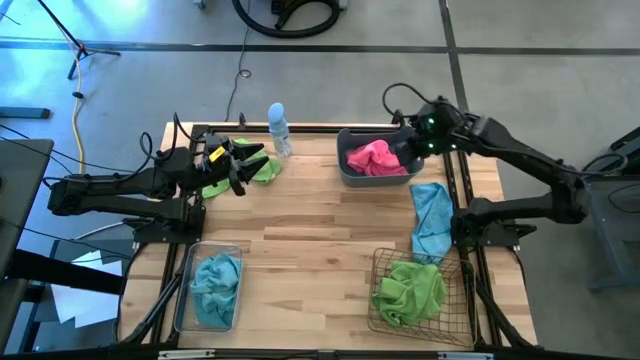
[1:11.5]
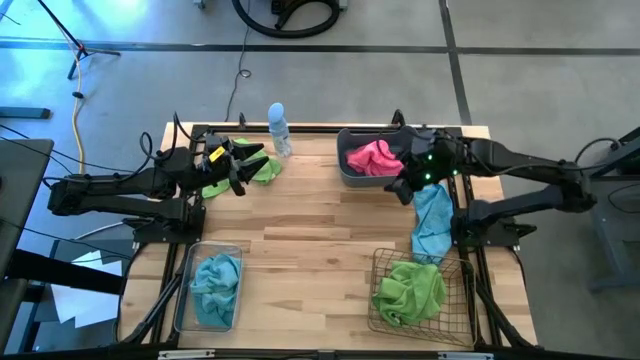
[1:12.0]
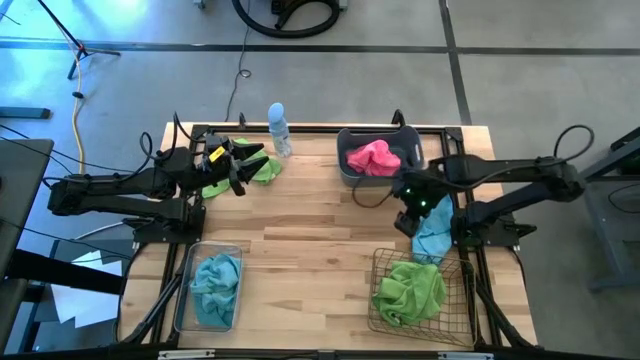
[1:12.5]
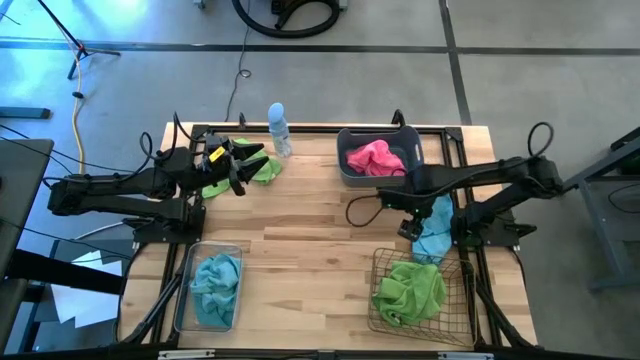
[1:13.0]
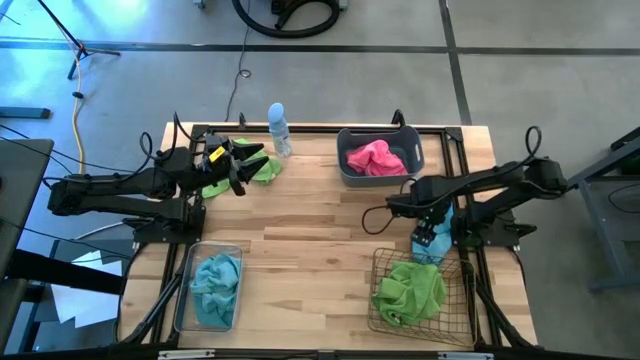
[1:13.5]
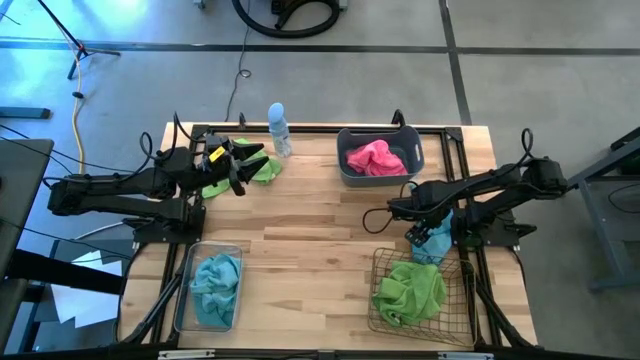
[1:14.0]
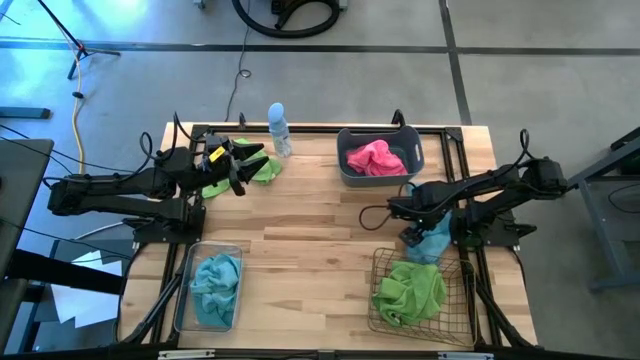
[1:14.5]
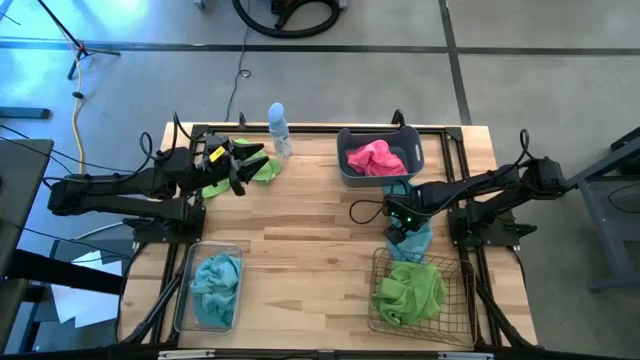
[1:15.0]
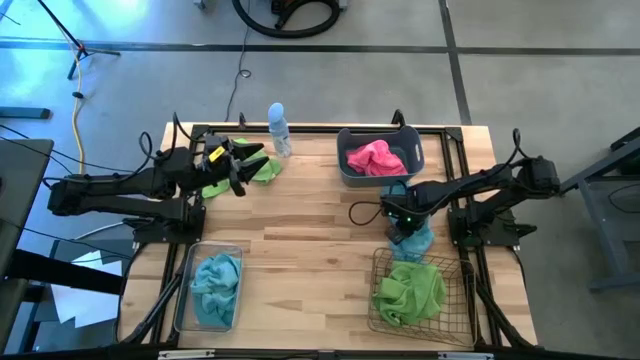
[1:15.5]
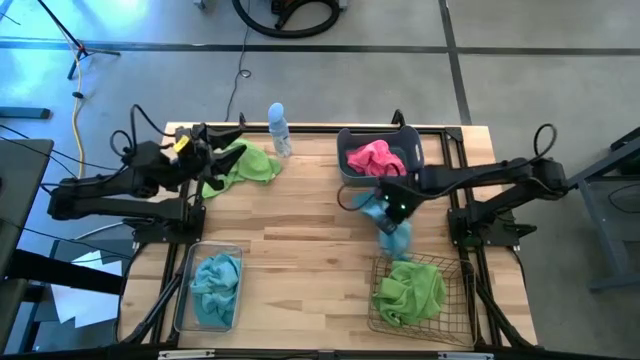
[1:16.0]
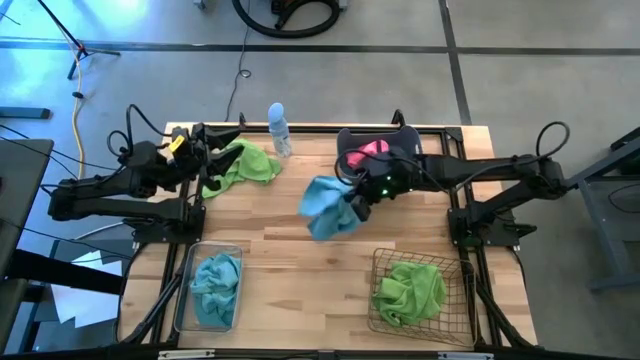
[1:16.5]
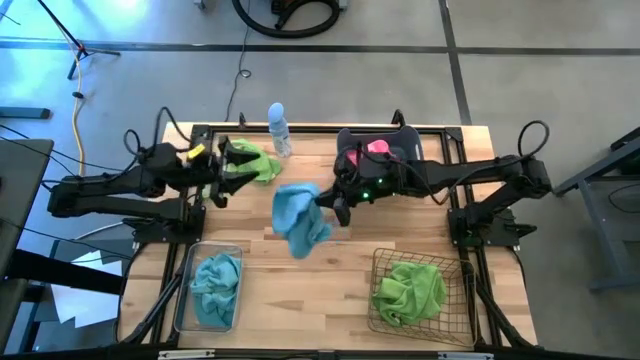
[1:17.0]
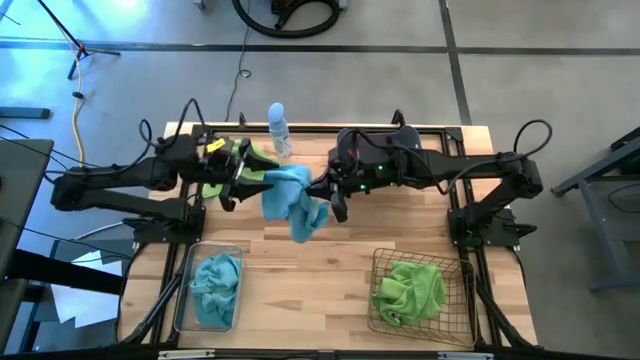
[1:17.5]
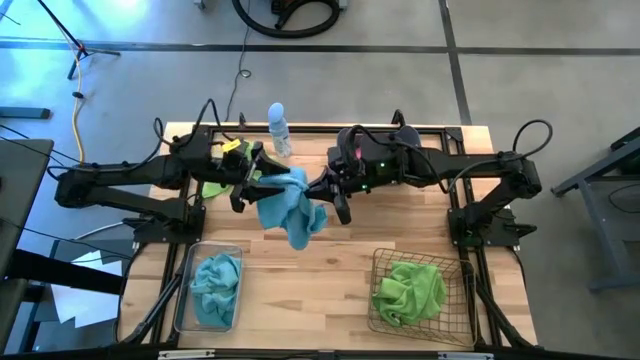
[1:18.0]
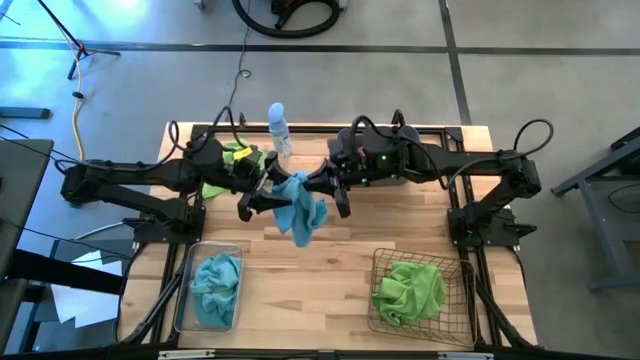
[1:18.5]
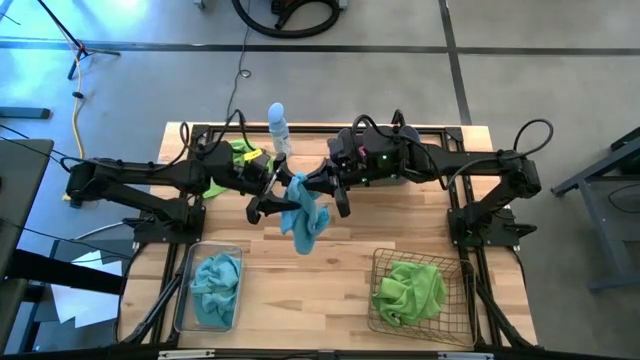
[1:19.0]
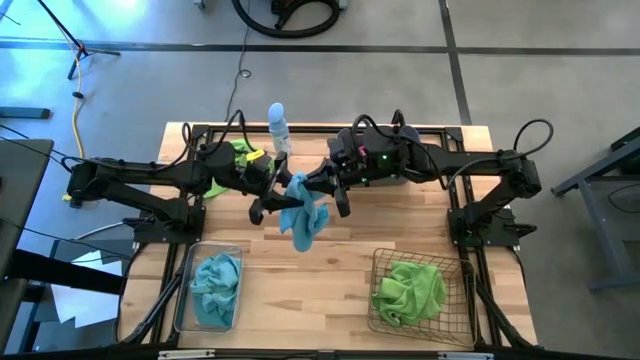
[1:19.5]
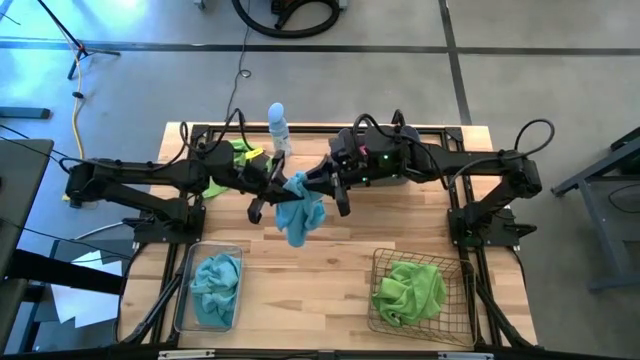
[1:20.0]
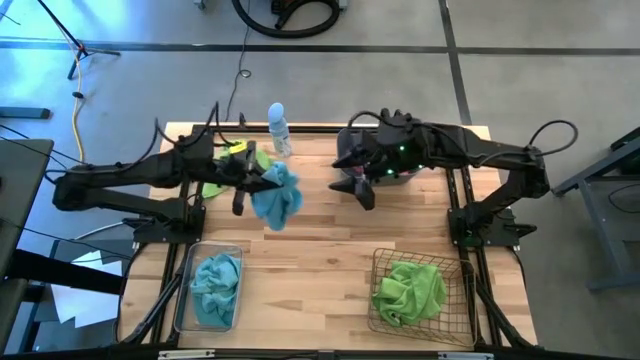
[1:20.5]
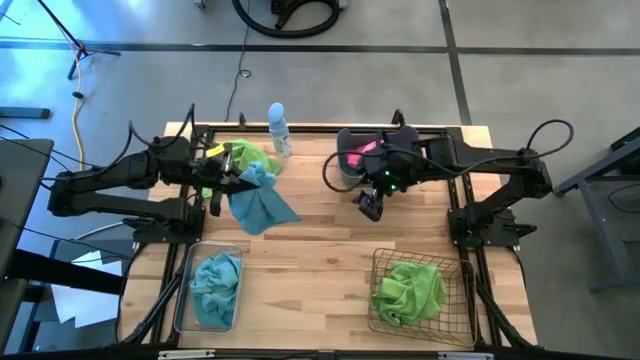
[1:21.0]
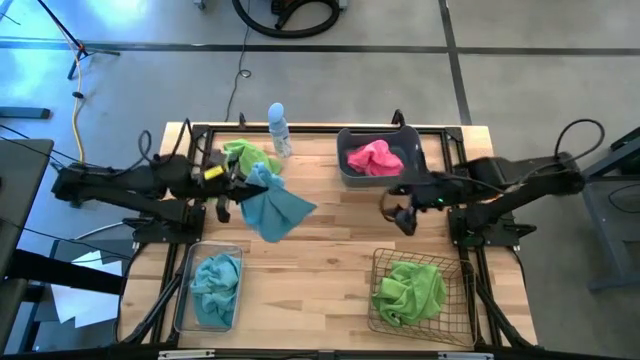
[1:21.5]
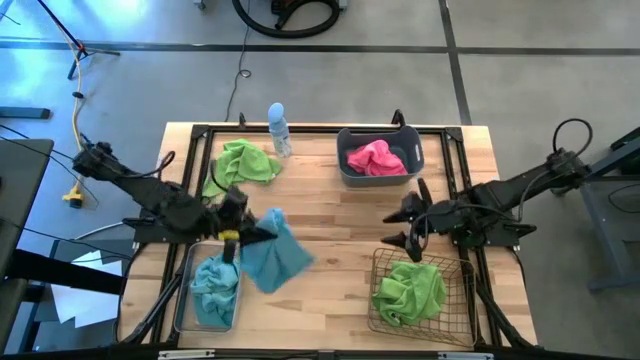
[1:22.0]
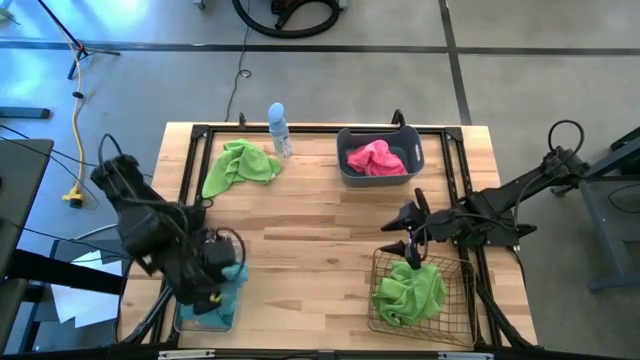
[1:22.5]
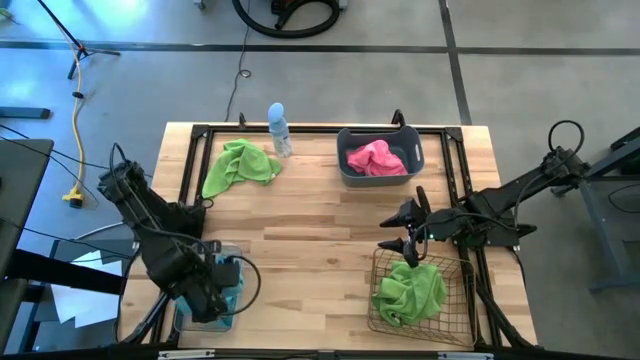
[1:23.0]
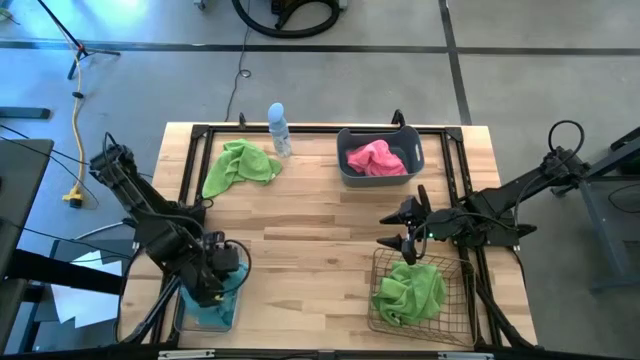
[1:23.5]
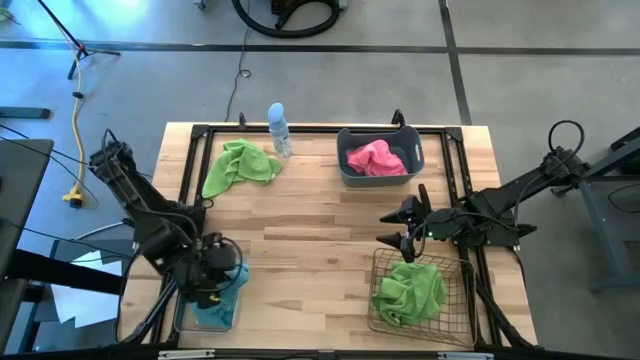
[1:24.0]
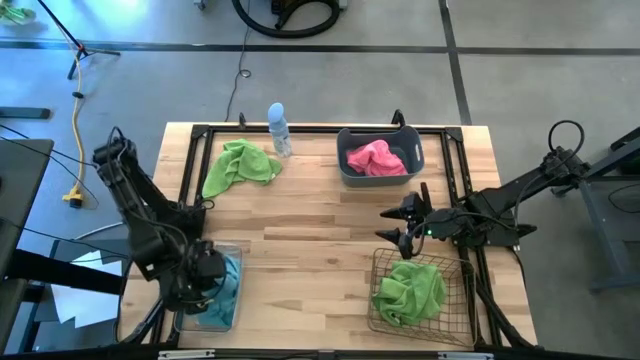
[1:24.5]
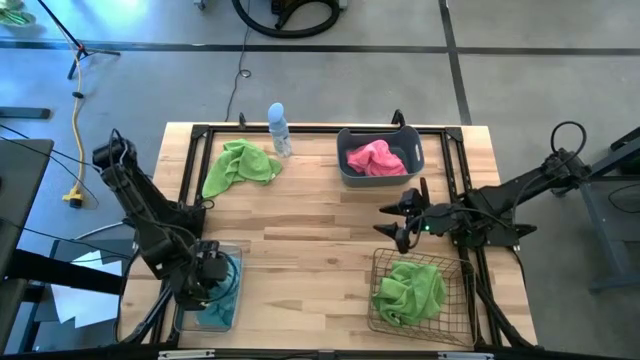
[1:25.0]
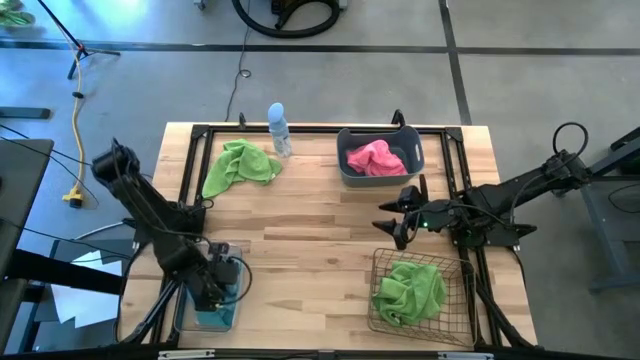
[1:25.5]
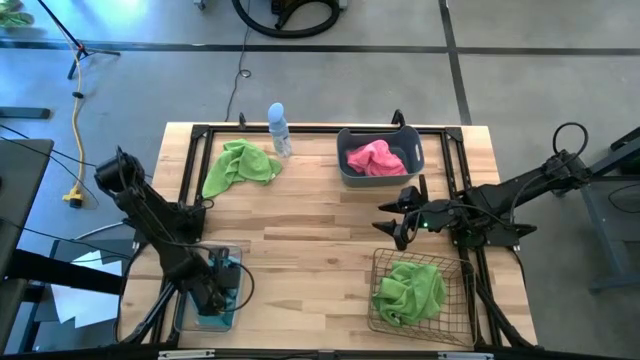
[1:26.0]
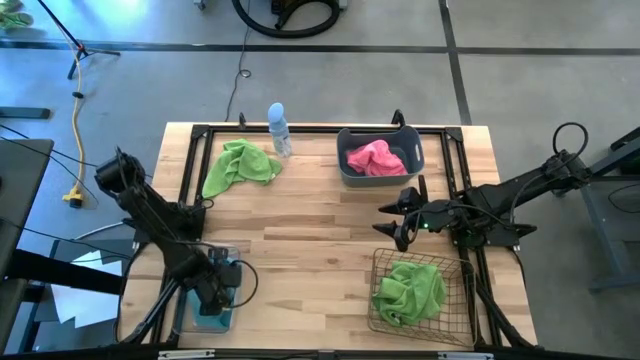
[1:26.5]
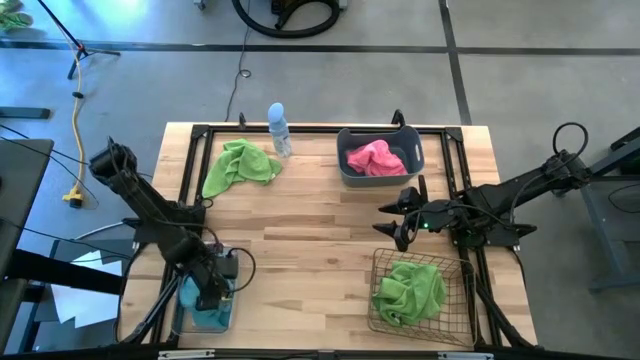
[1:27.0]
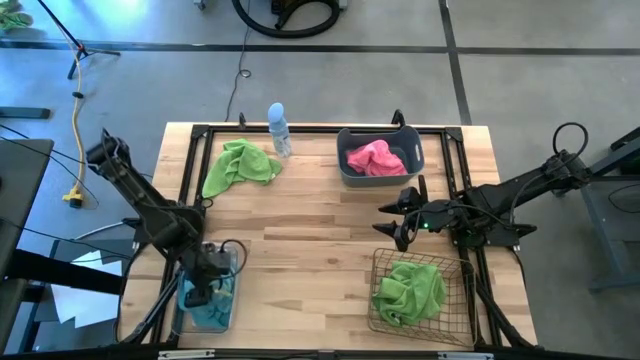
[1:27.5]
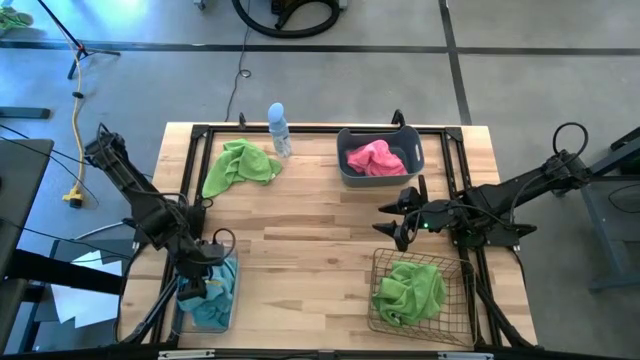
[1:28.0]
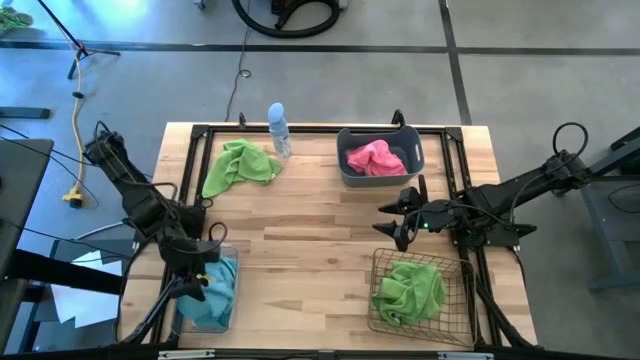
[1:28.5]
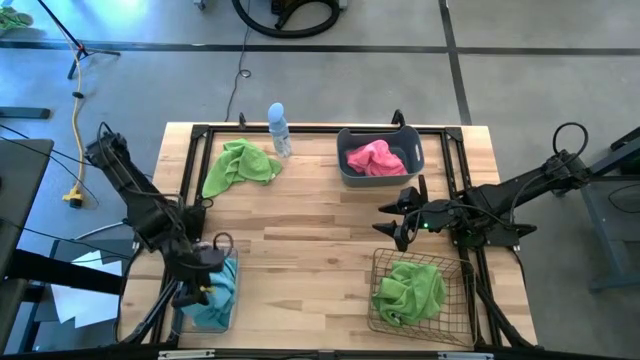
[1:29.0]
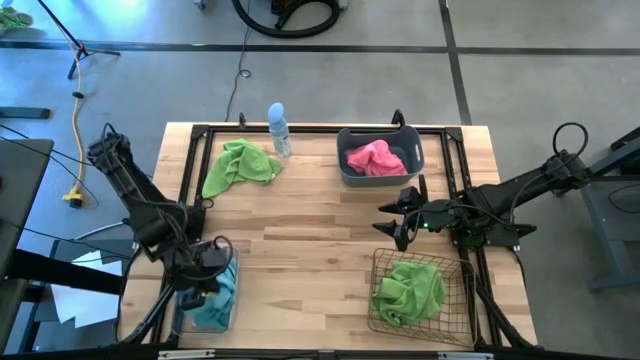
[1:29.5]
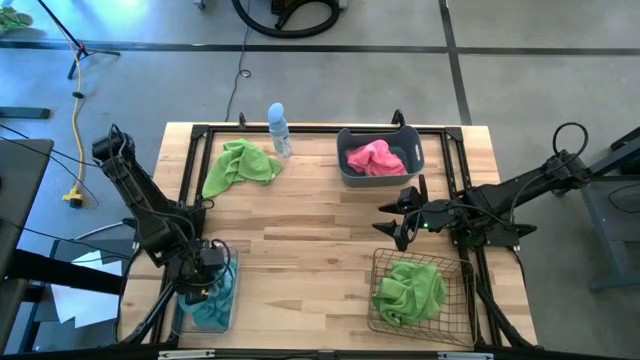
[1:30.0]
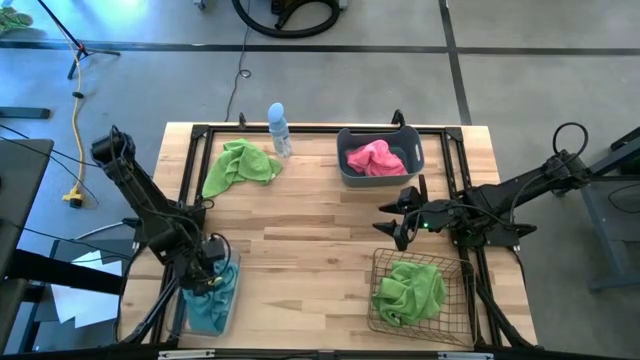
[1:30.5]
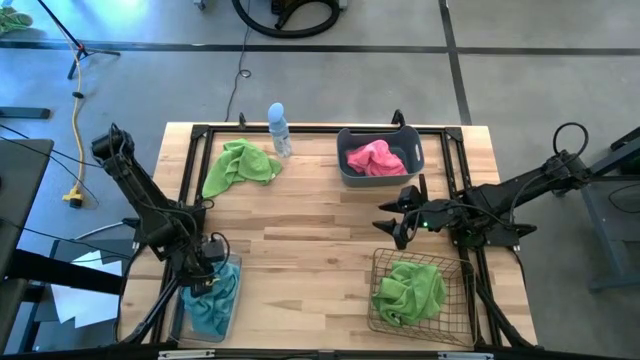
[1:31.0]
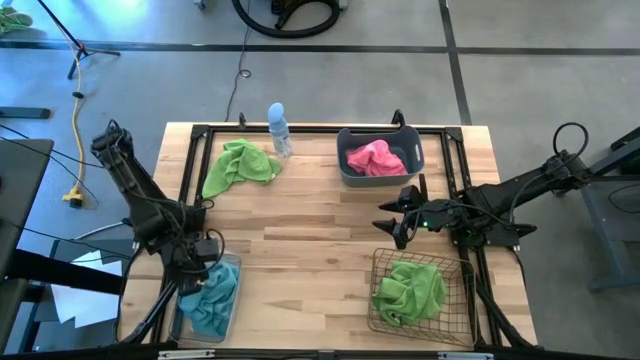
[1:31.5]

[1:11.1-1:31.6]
Task: Sort microfiber towel by color & place in baskets
Put the blue microfiber towel into the transparent bin
